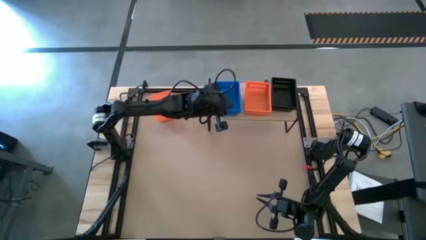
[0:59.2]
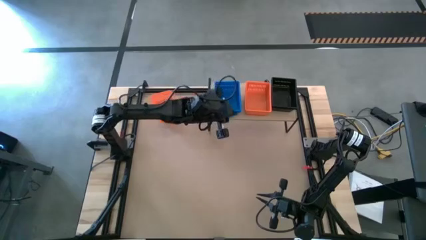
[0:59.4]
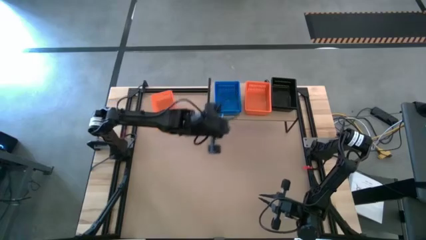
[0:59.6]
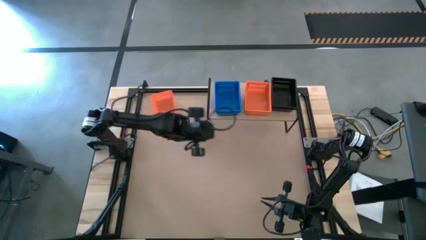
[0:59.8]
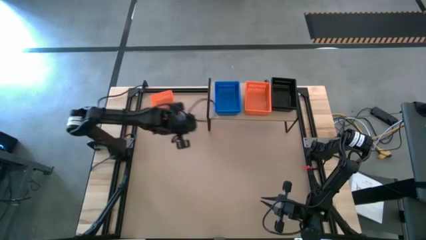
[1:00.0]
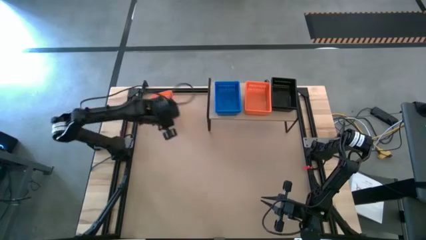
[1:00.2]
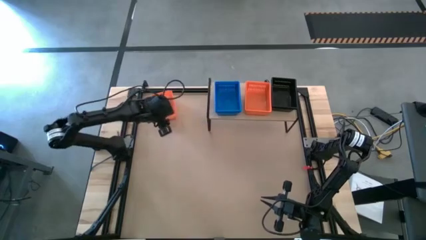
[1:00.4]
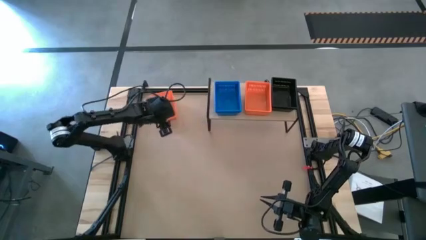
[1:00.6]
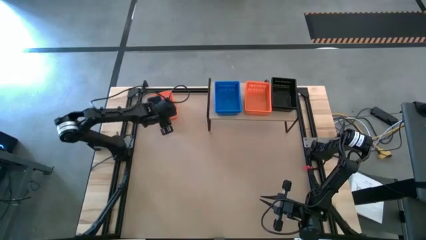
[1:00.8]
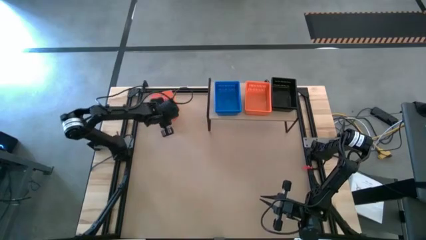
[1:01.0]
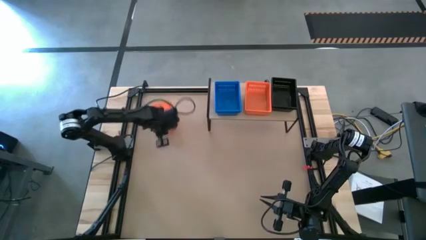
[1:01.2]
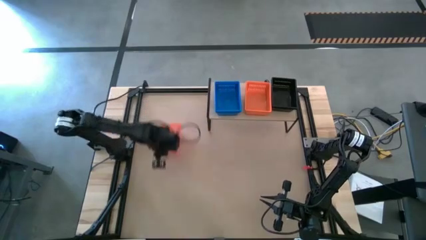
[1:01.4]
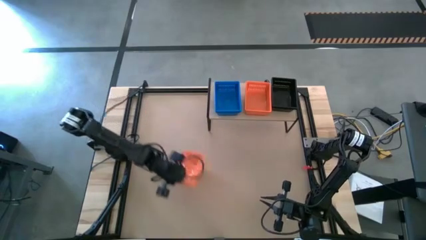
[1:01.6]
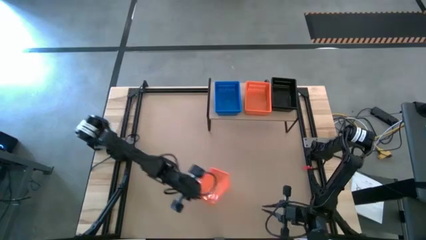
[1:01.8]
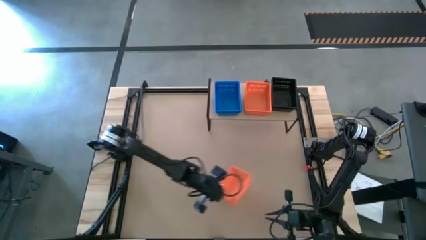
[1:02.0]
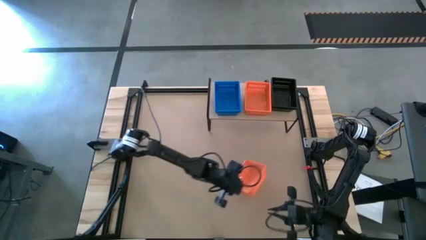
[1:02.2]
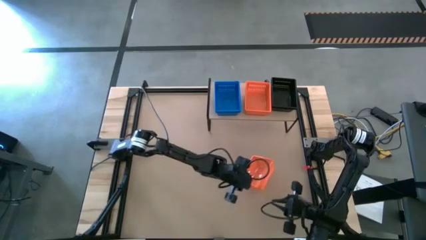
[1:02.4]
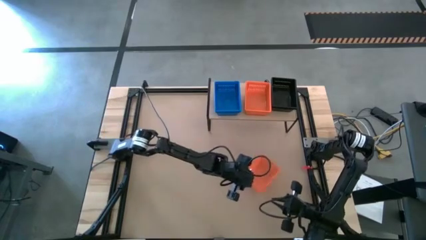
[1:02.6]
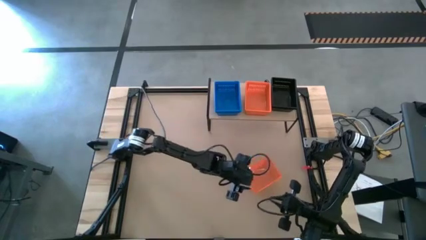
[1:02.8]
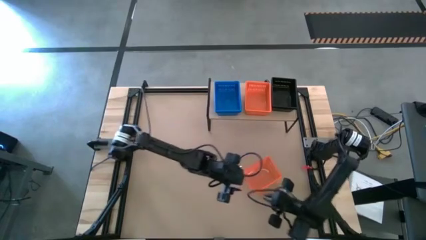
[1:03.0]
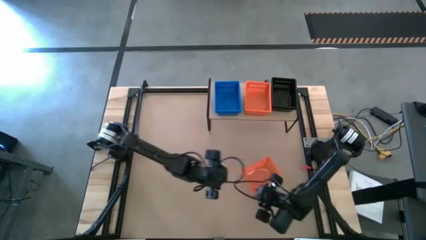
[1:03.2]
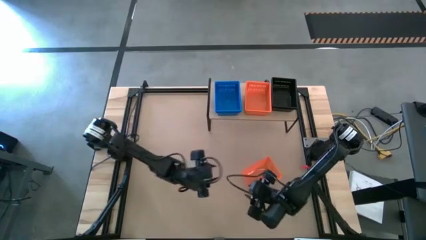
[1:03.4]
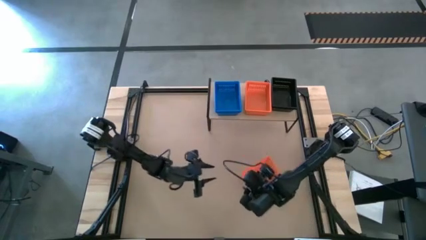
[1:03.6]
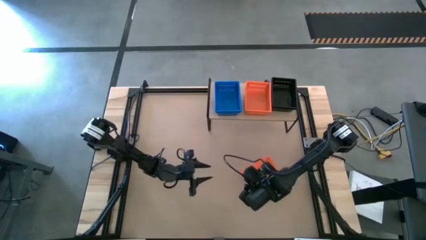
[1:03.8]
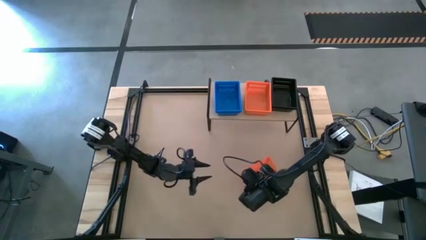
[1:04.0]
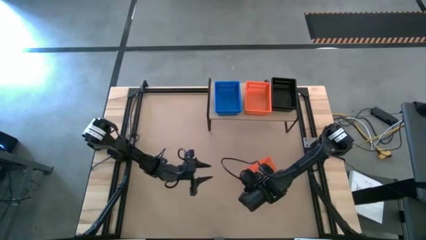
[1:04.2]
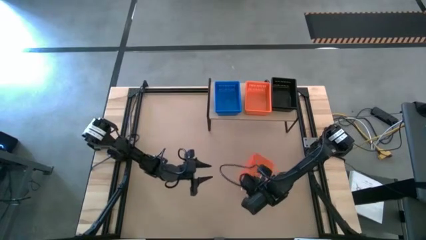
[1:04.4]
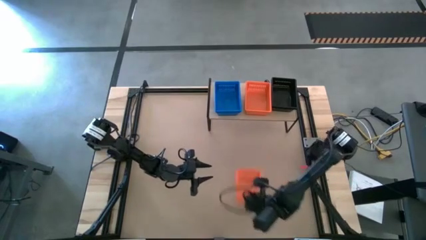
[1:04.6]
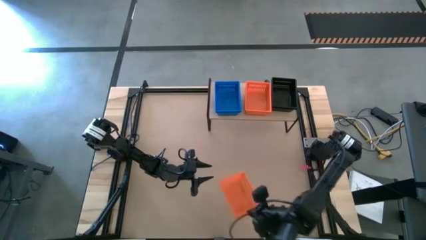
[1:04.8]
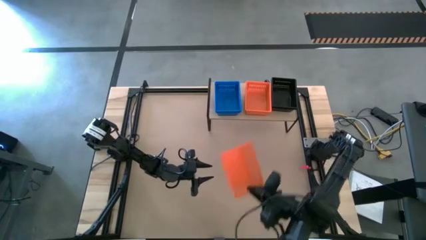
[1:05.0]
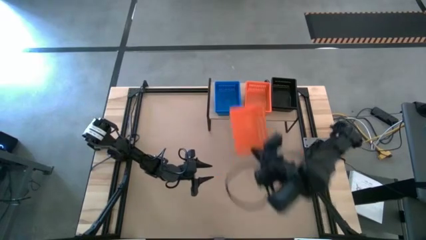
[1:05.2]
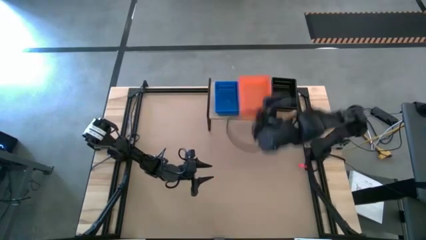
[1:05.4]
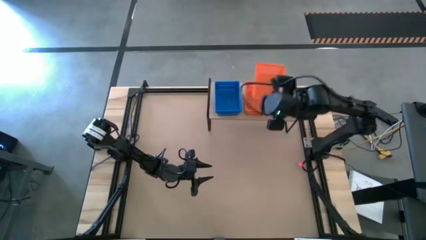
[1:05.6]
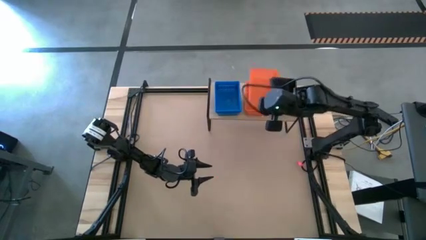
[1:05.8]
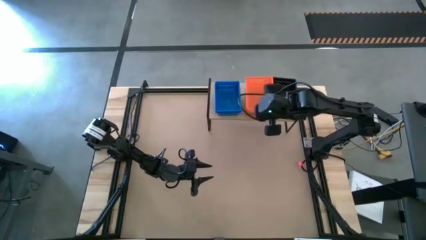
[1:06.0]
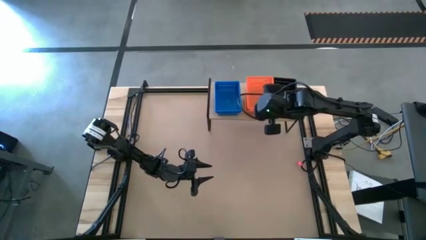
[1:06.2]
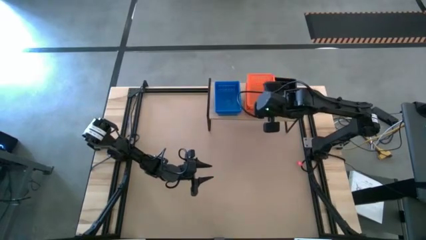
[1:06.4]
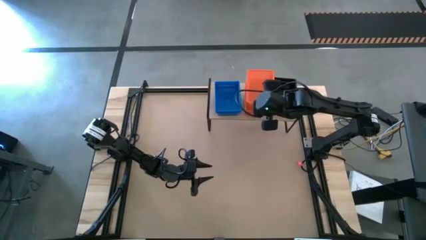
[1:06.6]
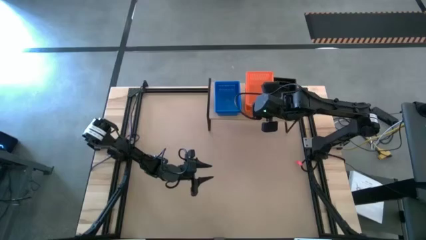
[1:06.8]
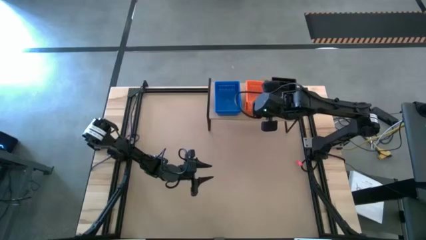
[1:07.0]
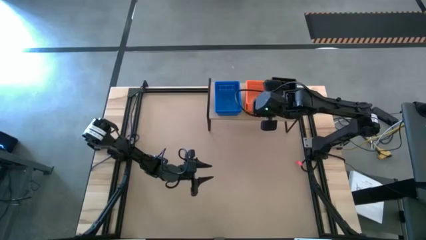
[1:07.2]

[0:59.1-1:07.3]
Task: Stack baskets on shelf by color
Stack the orange bin on the orange bin

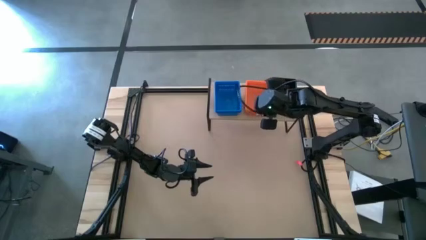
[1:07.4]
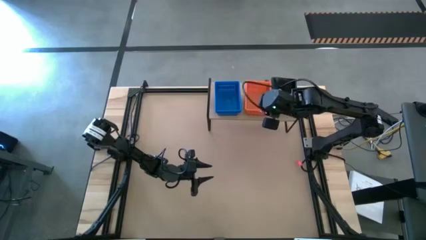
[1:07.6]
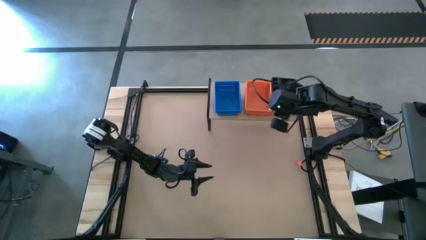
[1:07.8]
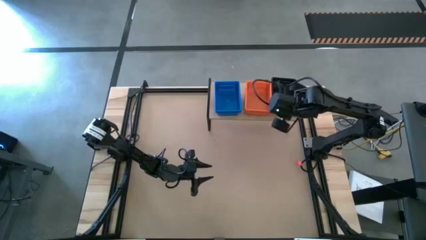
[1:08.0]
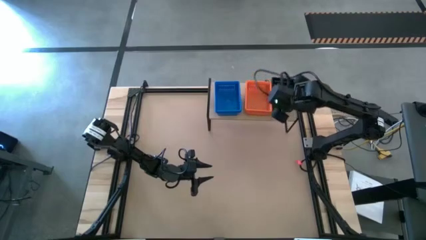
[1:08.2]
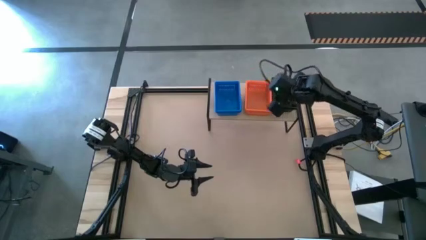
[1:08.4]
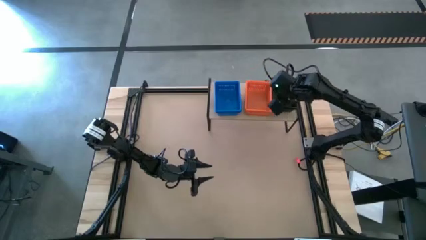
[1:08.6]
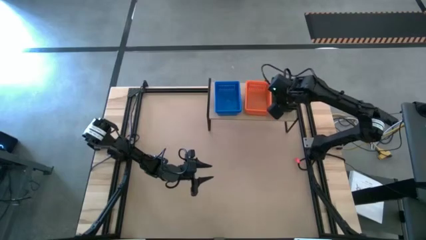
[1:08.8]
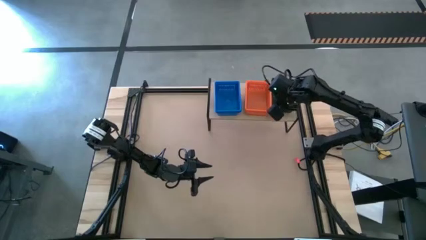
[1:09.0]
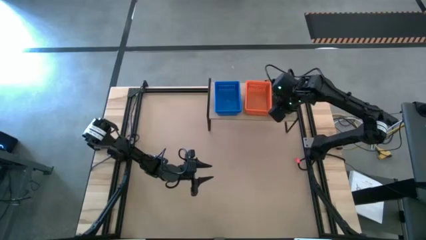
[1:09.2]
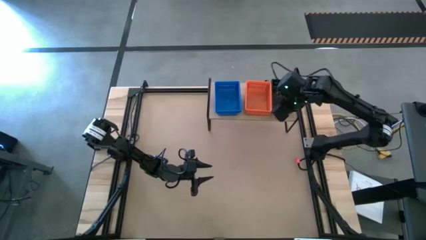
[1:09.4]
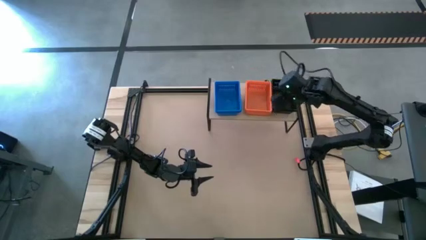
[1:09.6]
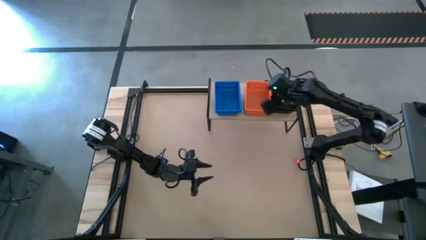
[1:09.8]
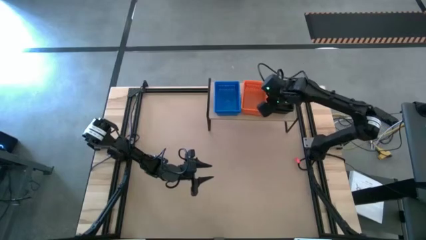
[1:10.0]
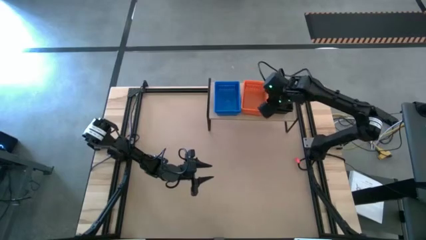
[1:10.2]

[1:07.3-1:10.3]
Adjust the stack of black bins on the shelf

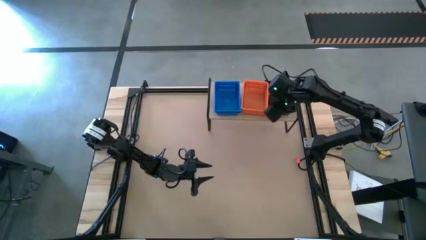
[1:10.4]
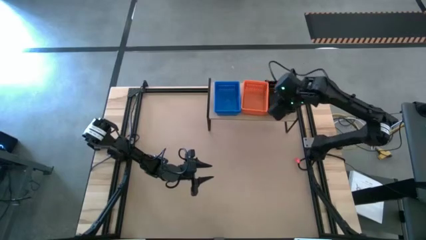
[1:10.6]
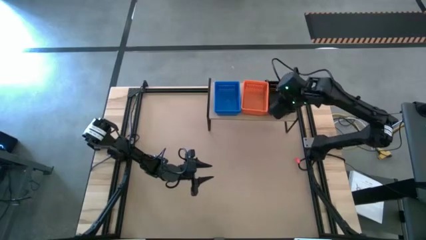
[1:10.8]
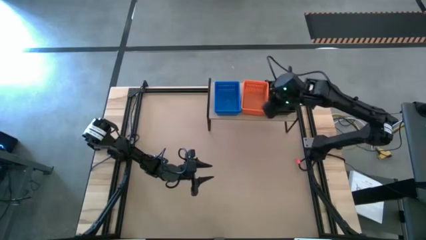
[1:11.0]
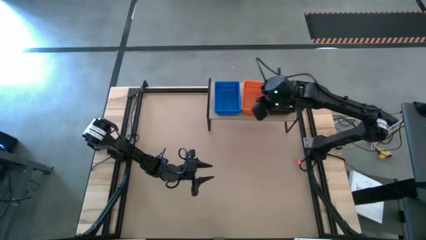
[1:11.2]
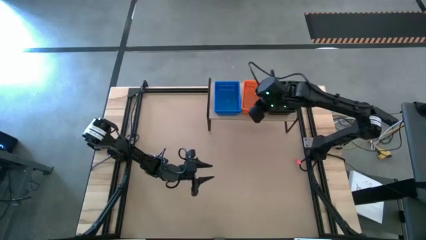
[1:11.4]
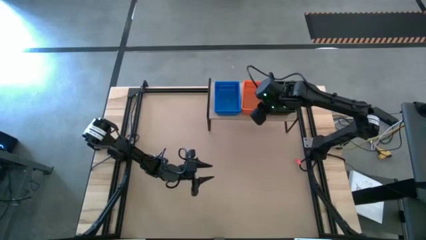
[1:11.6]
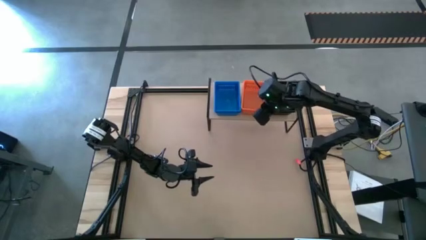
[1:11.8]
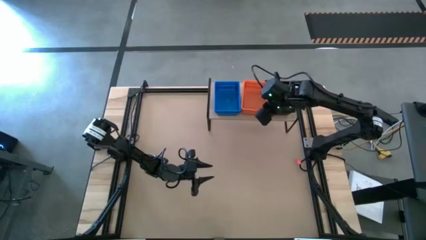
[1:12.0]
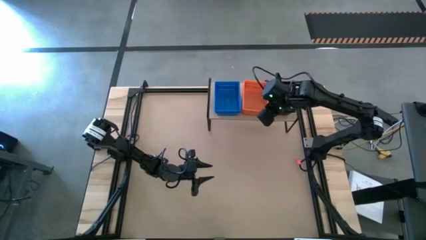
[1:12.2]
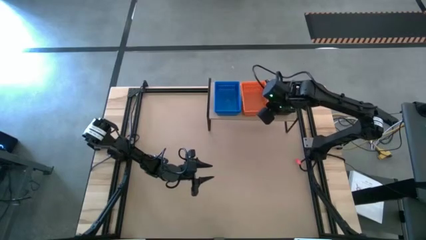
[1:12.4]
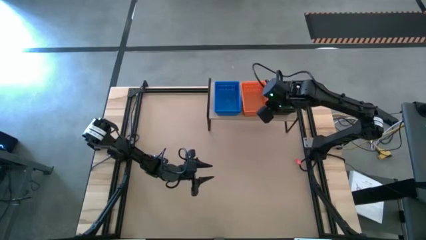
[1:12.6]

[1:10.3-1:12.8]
Adjust the stack of orange bins on the shelf
